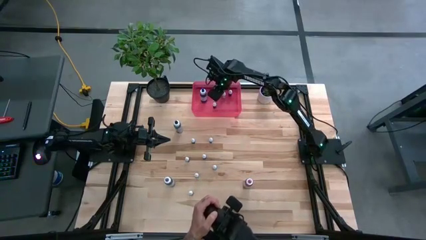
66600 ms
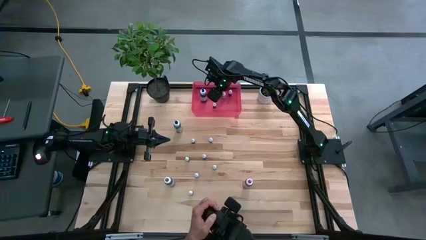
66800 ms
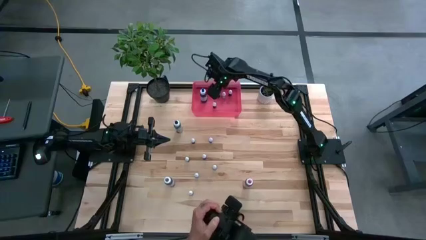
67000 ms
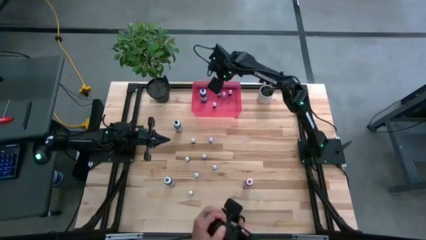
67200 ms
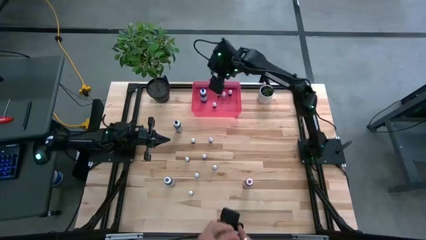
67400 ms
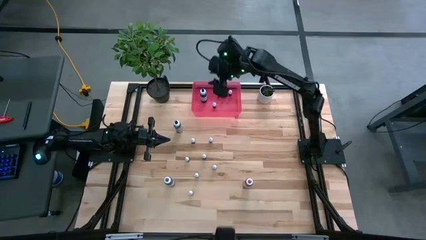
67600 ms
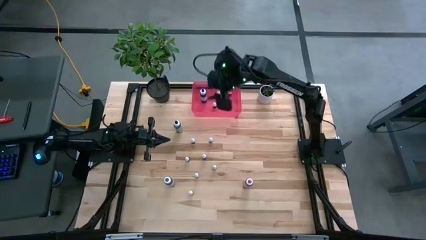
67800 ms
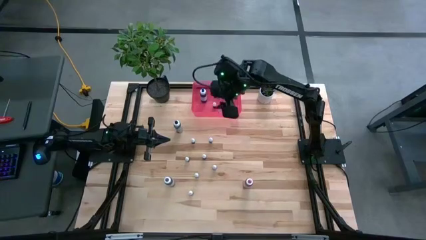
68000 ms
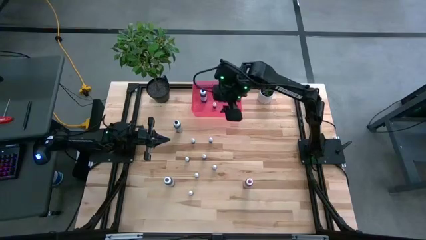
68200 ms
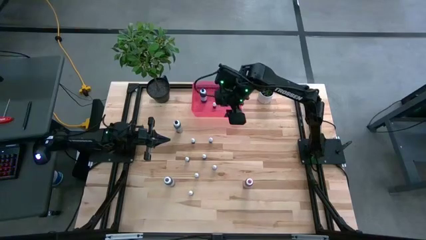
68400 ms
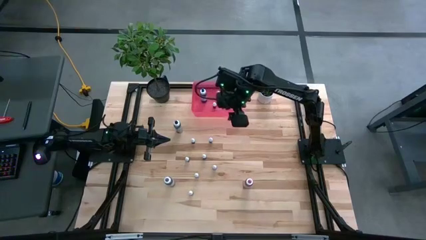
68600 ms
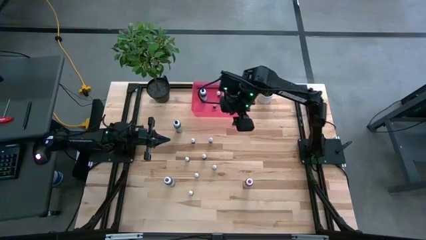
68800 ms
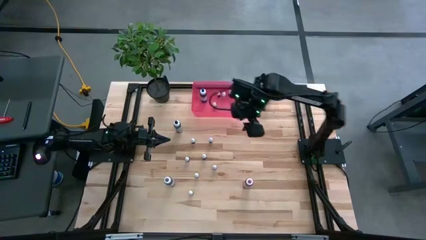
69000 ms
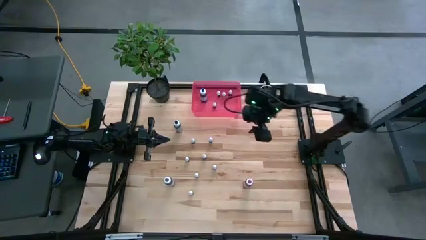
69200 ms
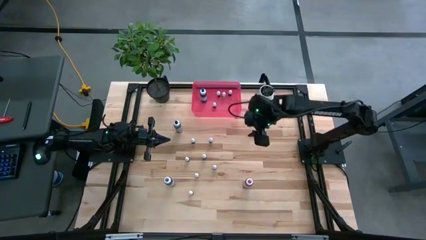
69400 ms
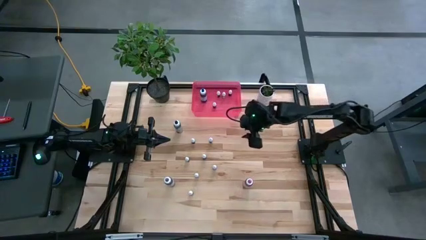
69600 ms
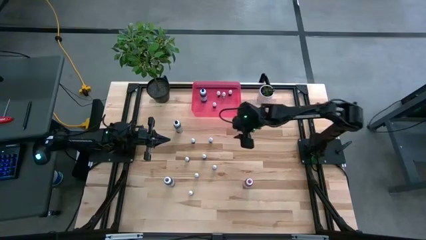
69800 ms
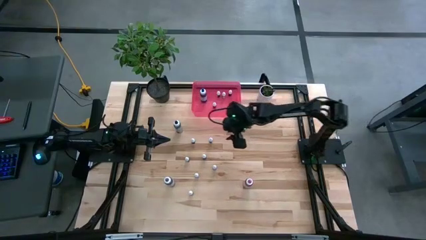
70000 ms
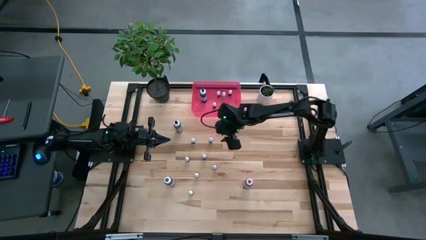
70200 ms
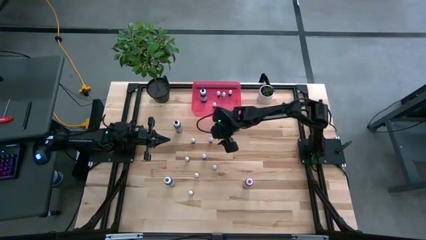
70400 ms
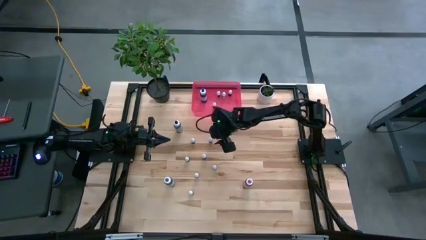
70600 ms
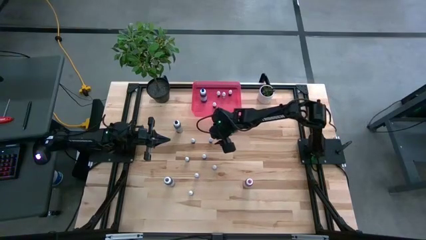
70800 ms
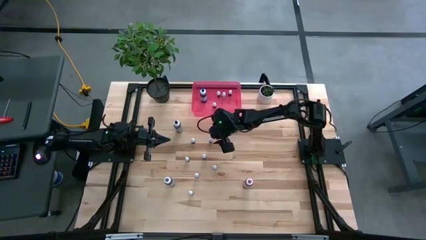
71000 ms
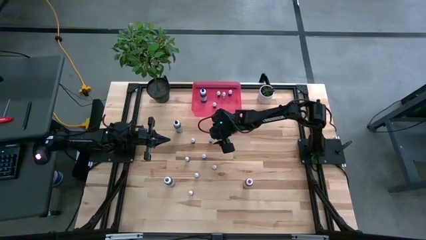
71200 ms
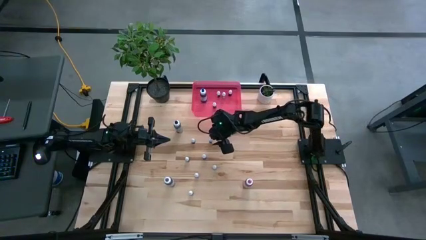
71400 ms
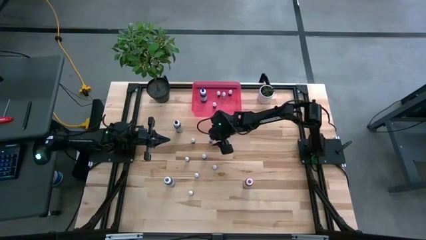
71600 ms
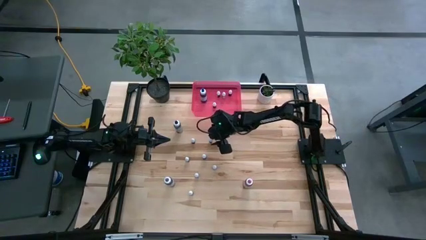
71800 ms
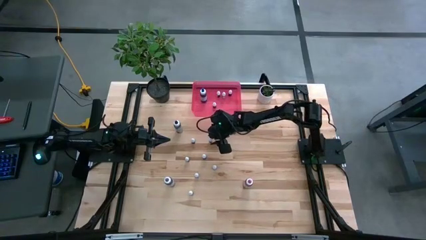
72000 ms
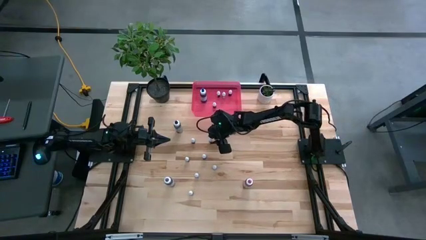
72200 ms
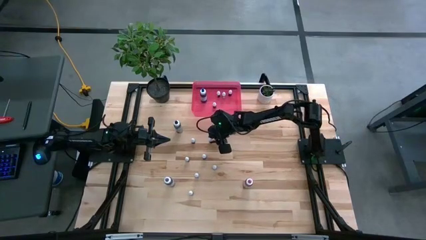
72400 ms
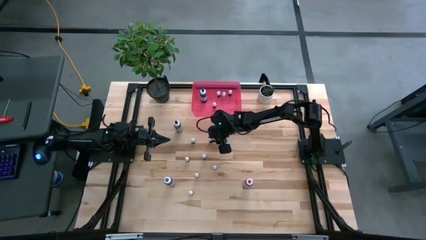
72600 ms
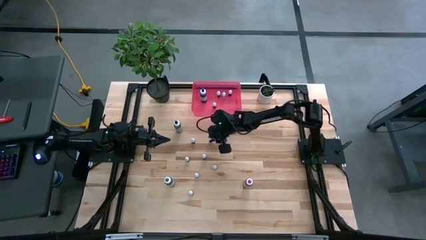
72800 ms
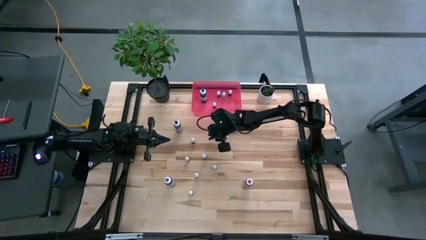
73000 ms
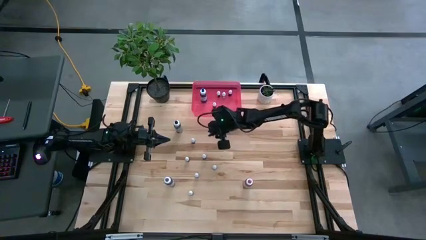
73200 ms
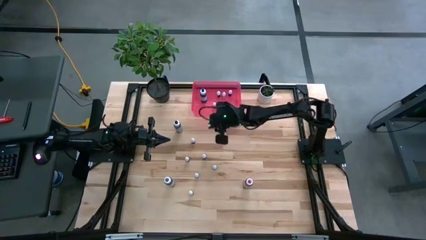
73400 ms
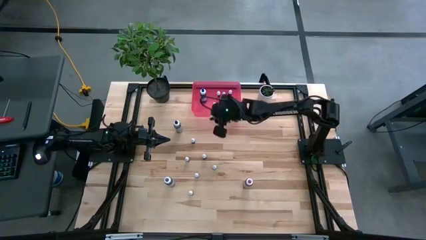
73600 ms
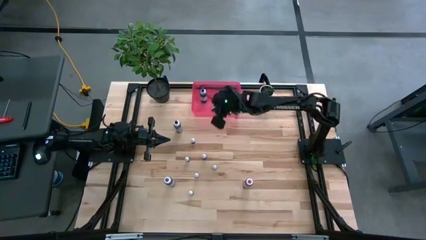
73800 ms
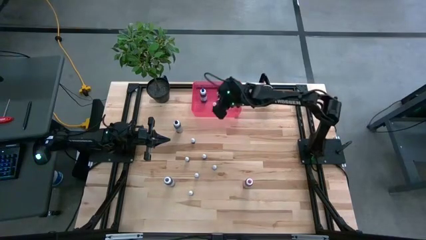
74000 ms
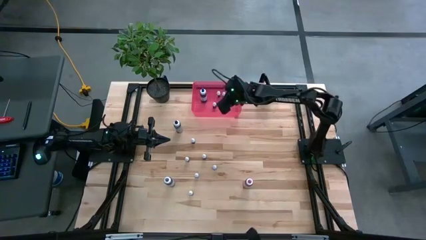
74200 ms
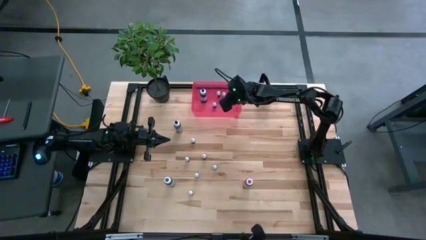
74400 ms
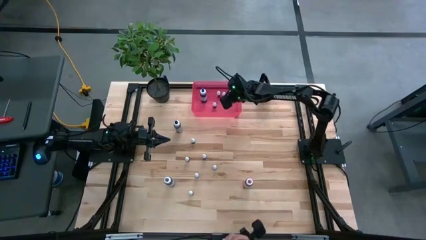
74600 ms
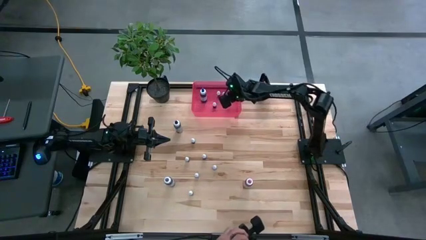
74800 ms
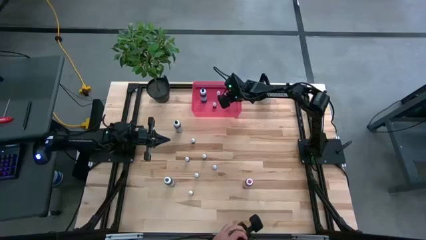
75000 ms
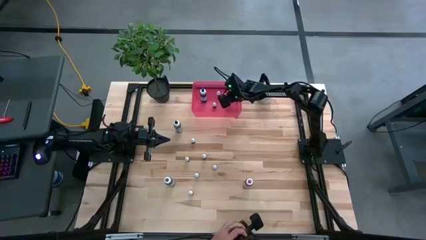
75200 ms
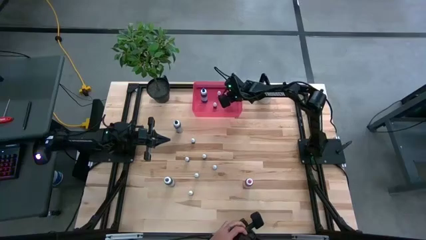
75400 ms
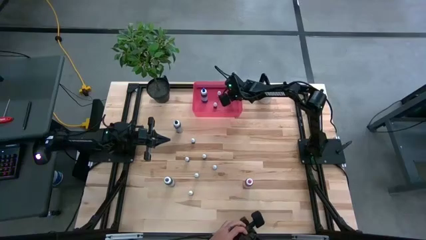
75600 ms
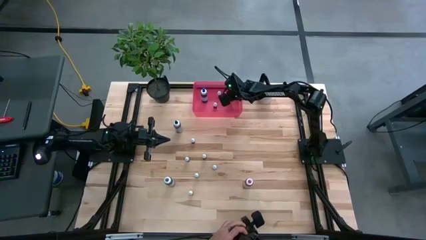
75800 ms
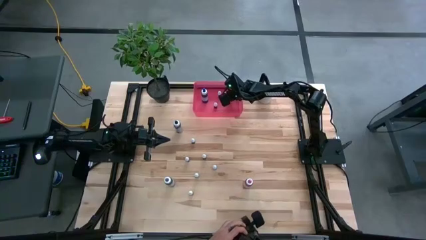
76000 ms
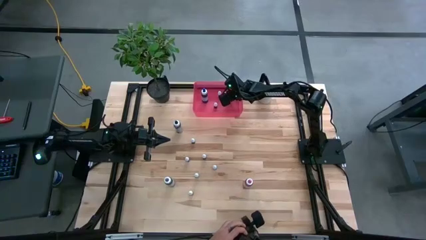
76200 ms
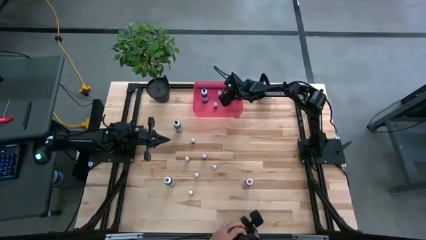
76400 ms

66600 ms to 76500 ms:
Task: Pick & Place food coloring
Put the small green food coloring bottle into the red bin

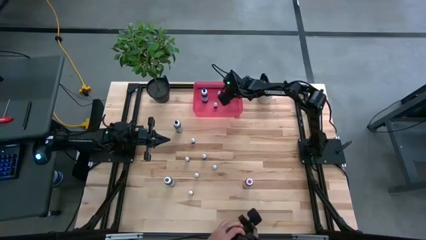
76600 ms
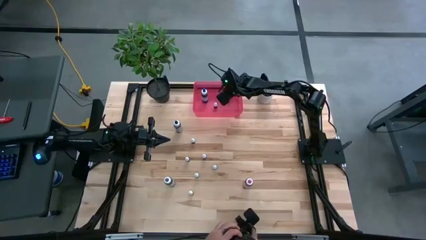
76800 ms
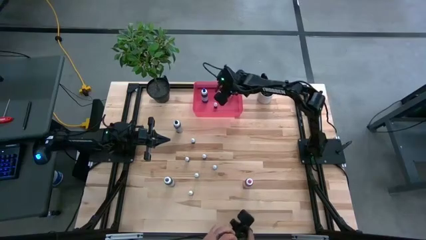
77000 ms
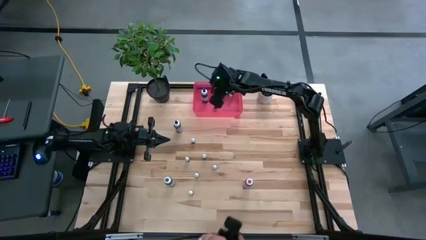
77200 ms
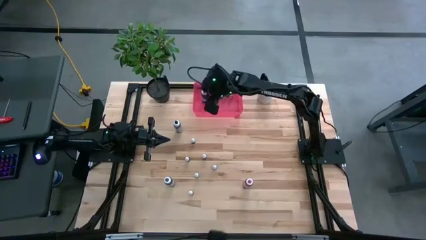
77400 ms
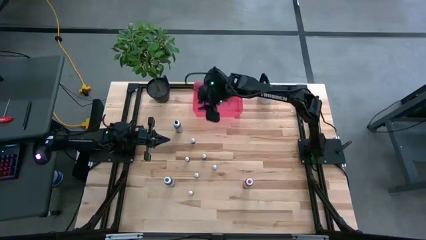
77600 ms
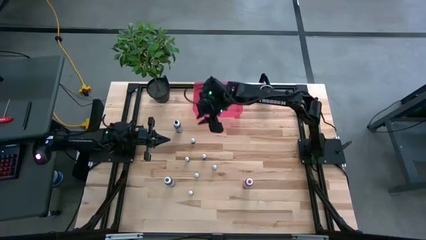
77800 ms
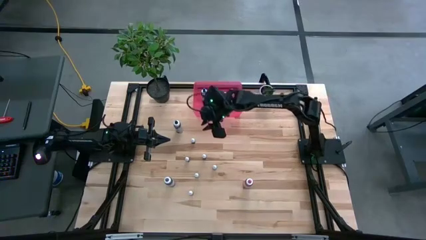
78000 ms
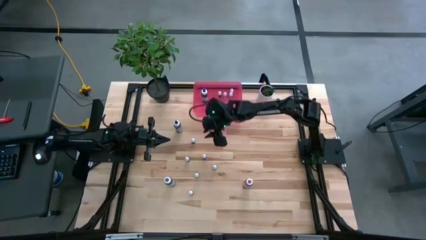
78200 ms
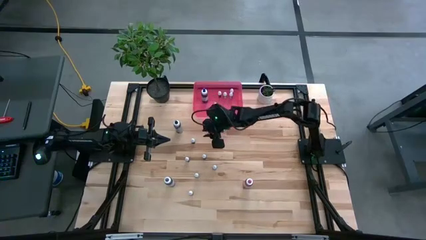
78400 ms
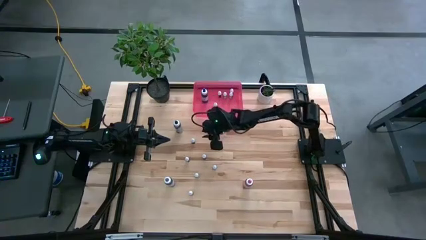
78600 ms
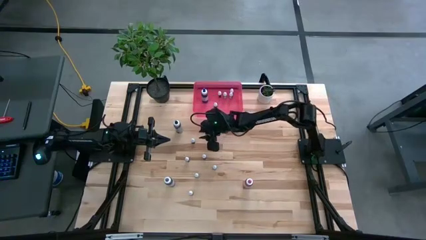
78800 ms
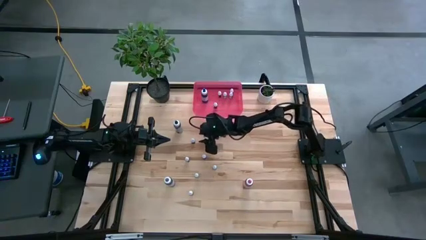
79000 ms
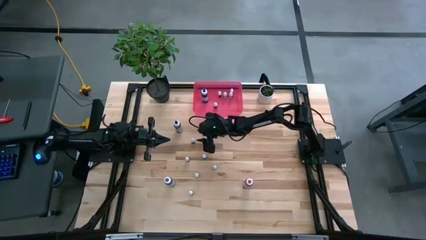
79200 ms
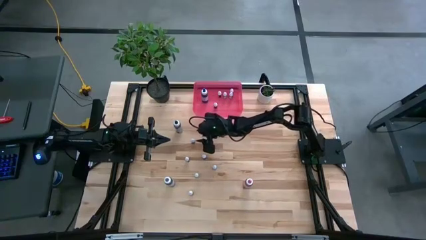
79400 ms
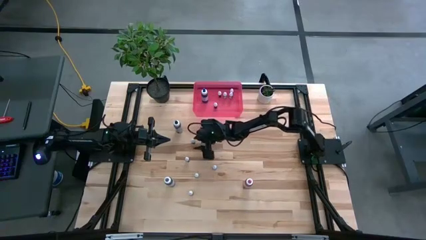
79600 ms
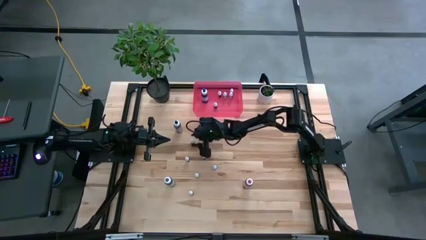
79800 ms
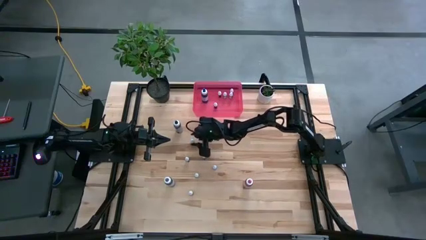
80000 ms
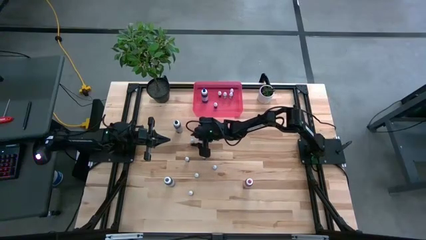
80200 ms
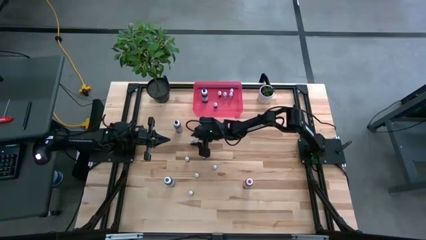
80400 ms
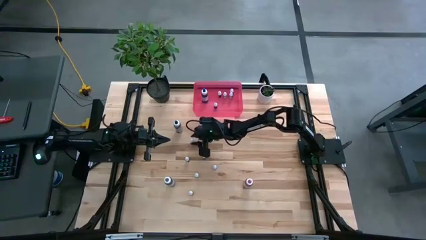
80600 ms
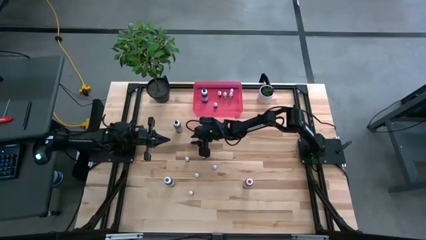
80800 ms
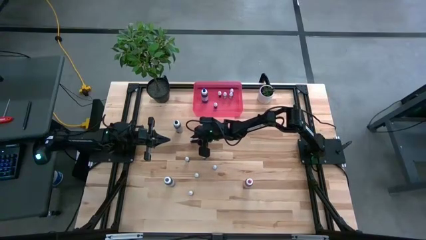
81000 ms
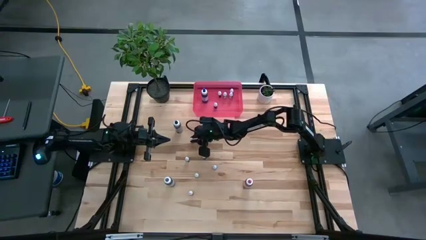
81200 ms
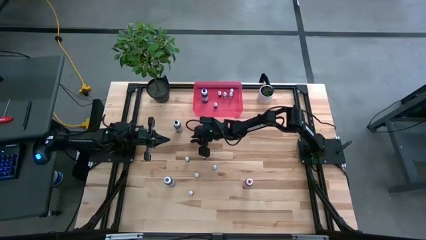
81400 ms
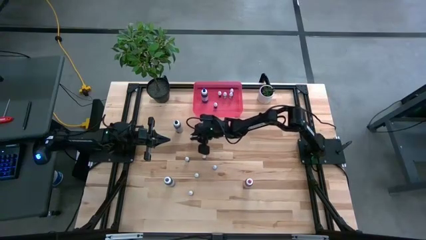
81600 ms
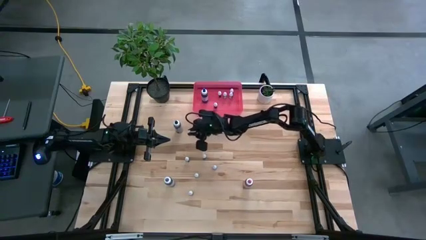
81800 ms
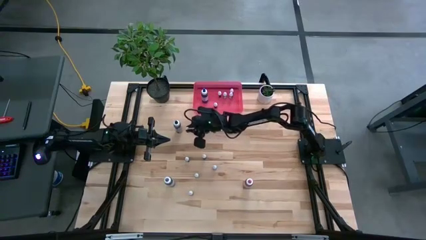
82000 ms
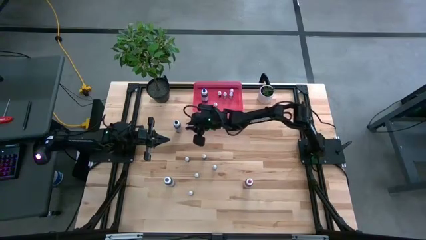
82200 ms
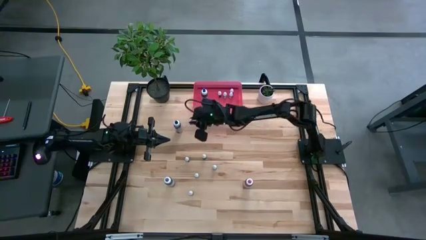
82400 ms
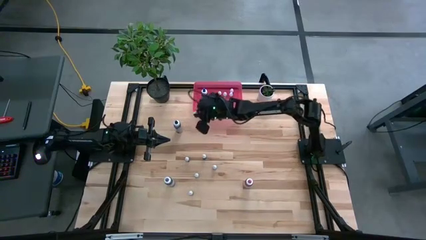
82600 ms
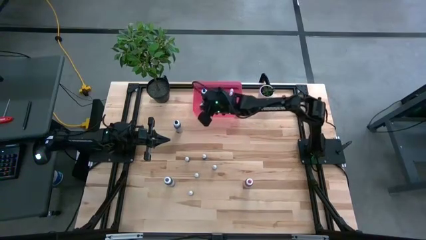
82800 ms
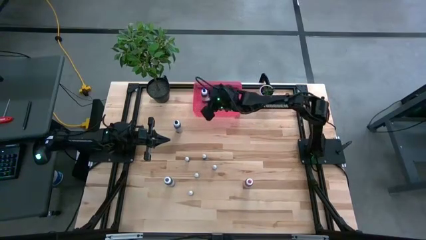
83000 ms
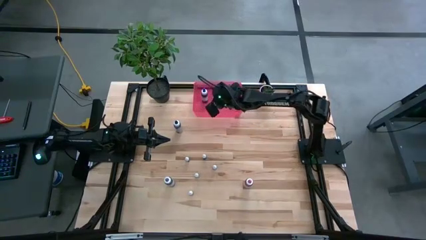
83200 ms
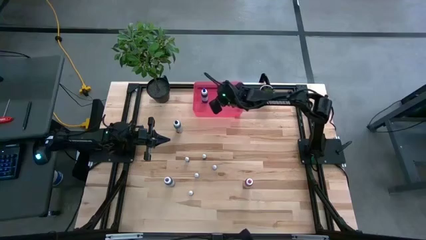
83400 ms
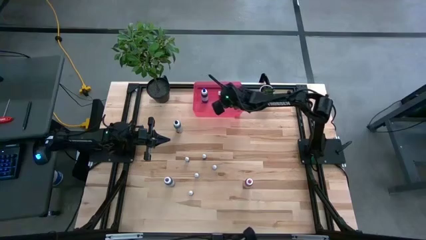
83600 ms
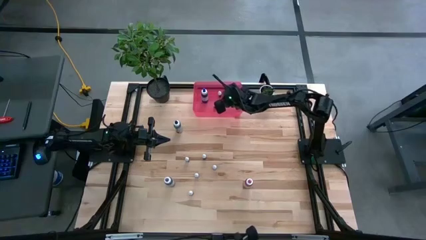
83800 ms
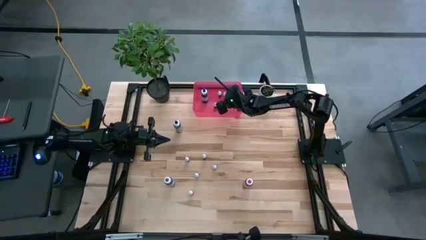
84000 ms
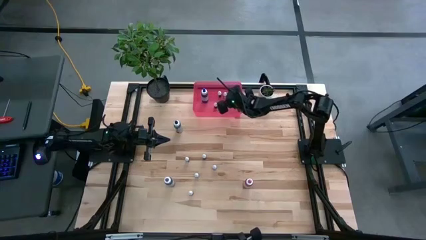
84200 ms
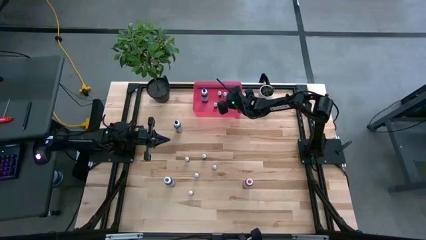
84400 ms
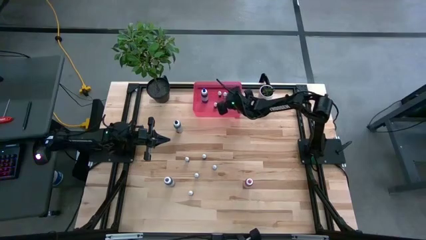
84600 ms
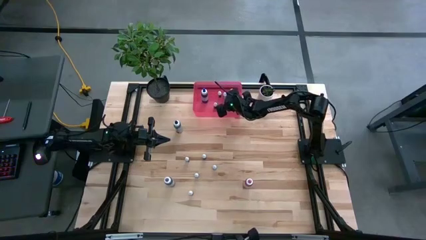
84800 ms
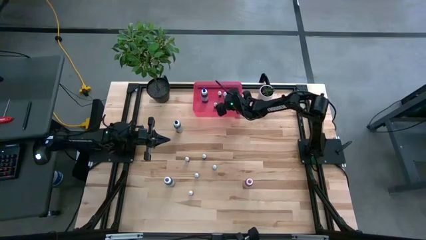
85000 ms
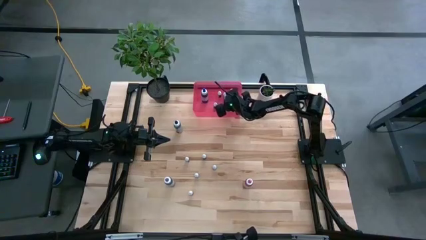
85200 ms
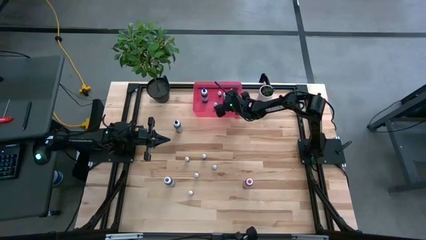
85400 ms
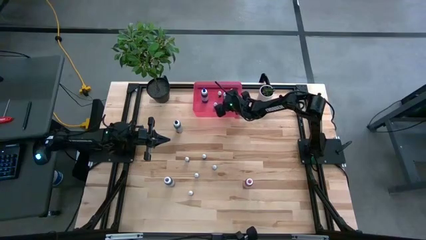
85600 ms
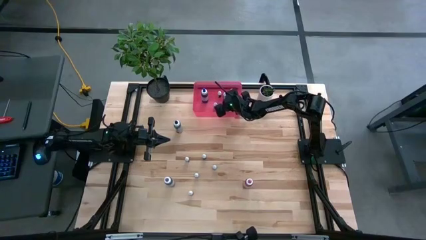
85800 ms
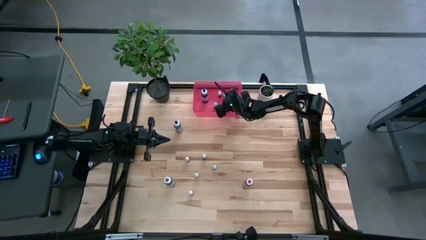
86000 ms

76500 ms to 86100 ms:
Put the small violet food coloring bottle into the red bin
